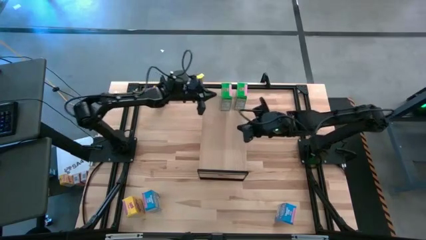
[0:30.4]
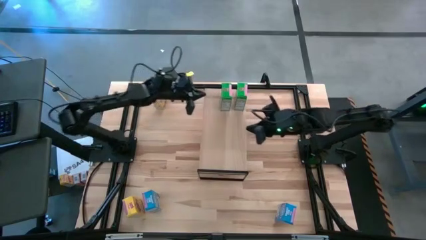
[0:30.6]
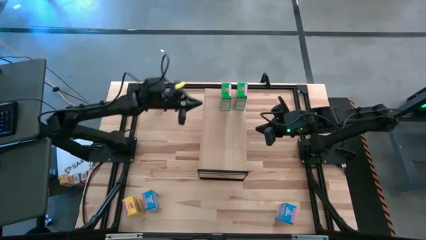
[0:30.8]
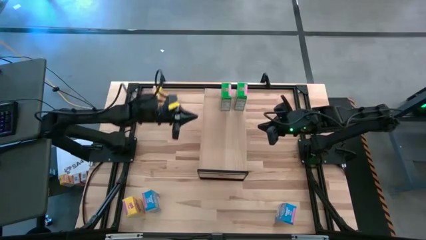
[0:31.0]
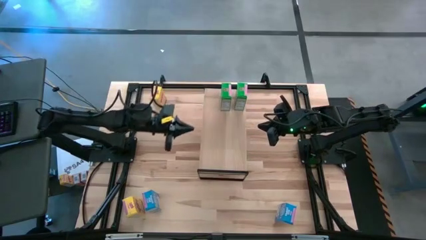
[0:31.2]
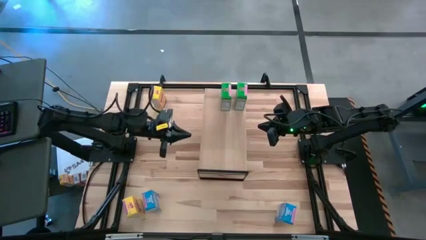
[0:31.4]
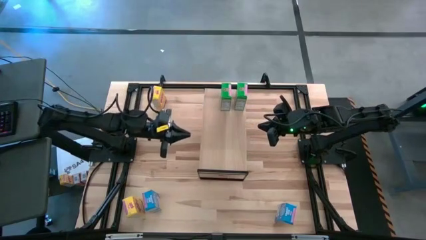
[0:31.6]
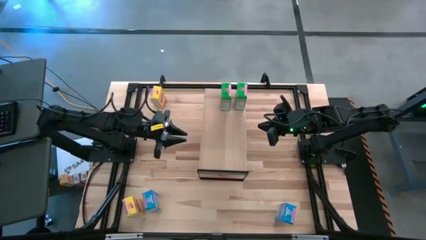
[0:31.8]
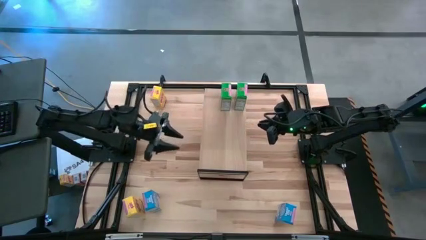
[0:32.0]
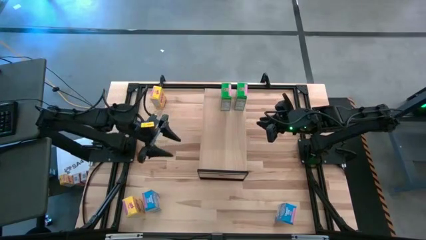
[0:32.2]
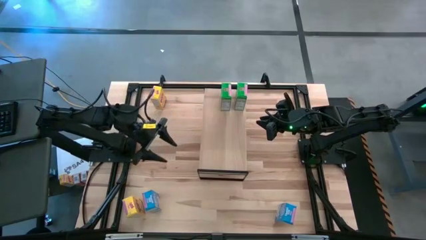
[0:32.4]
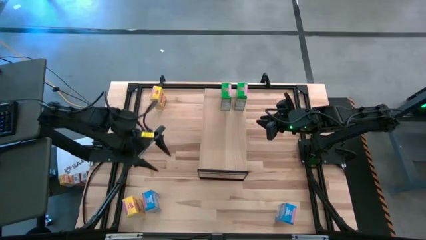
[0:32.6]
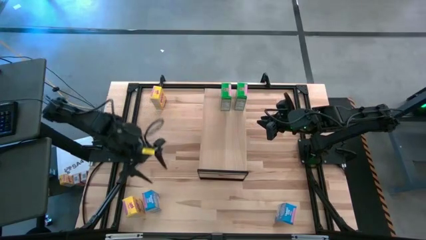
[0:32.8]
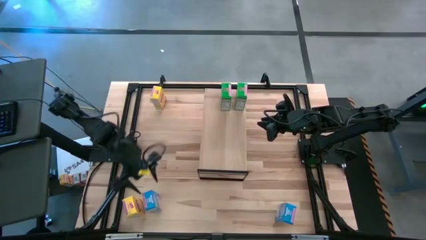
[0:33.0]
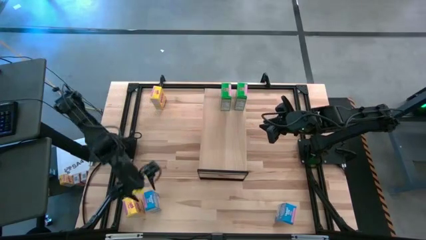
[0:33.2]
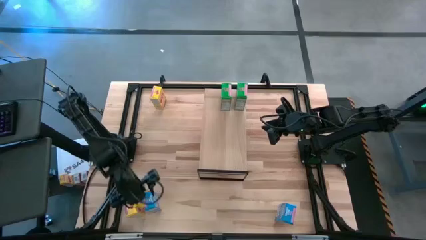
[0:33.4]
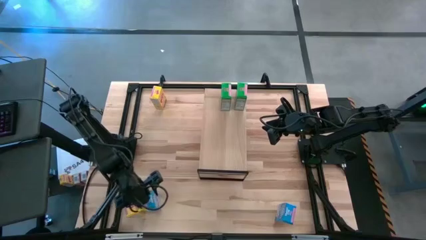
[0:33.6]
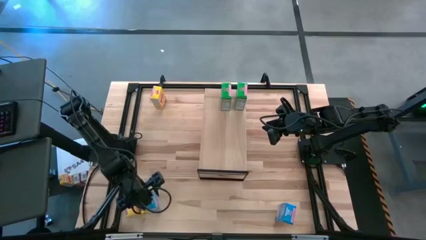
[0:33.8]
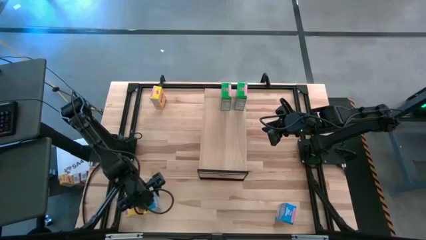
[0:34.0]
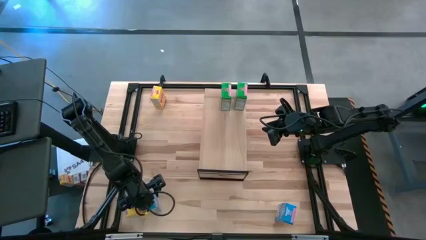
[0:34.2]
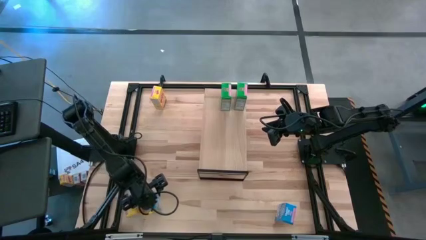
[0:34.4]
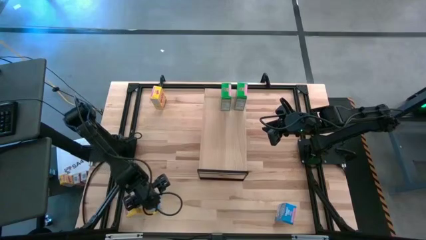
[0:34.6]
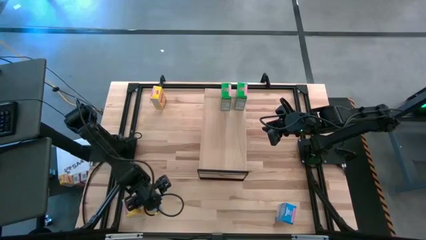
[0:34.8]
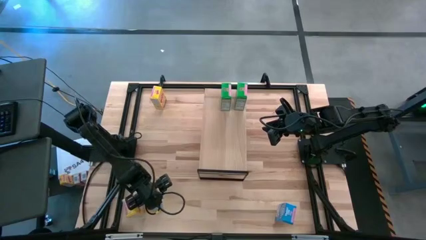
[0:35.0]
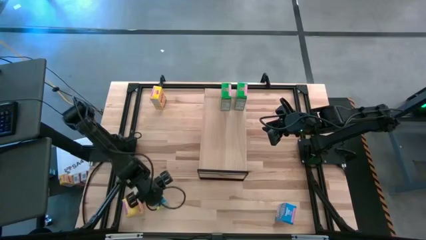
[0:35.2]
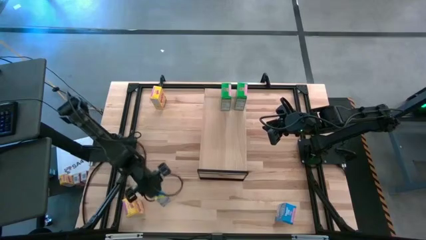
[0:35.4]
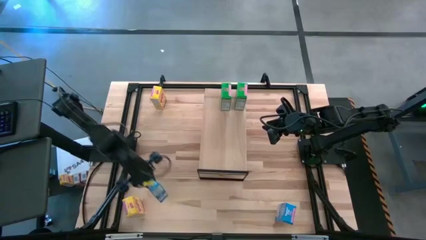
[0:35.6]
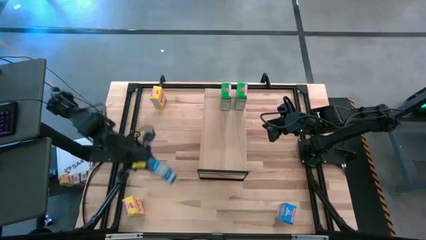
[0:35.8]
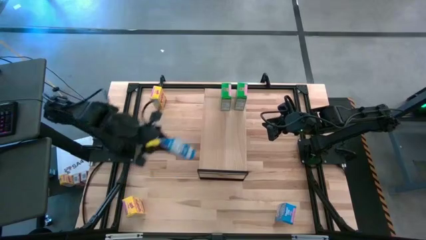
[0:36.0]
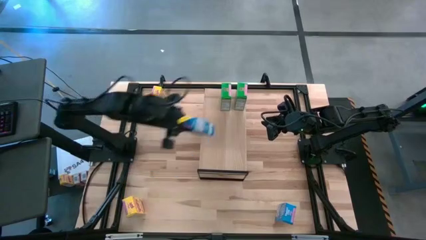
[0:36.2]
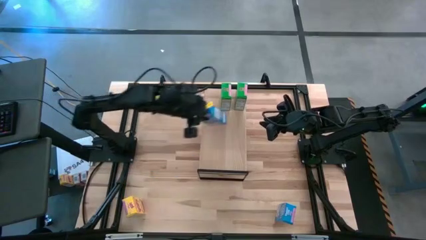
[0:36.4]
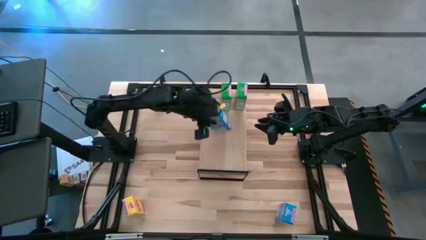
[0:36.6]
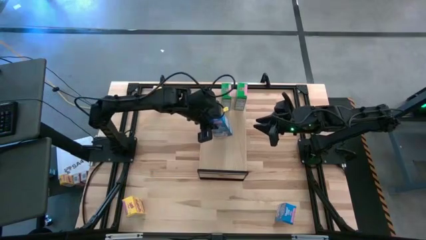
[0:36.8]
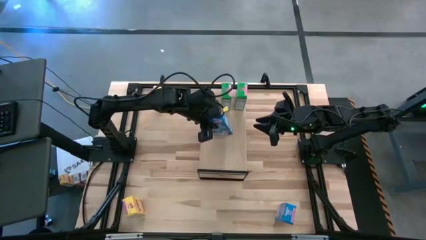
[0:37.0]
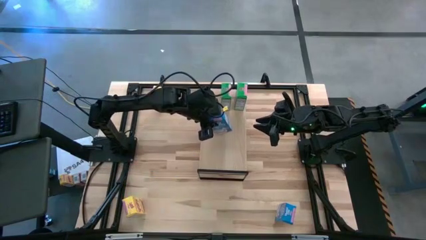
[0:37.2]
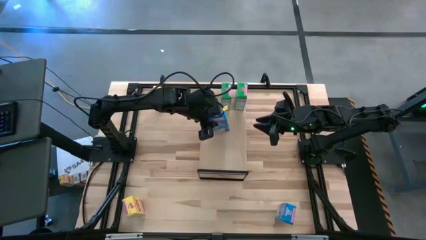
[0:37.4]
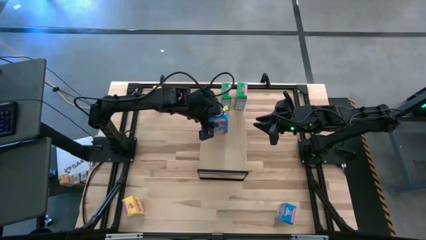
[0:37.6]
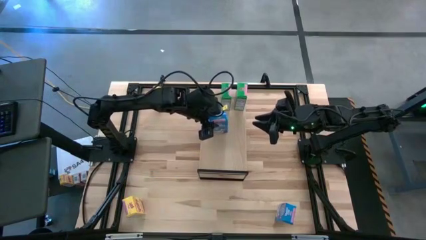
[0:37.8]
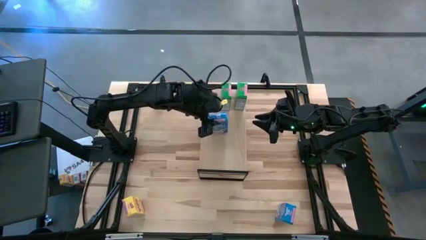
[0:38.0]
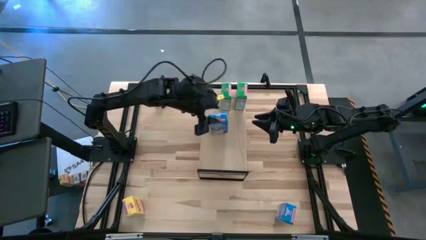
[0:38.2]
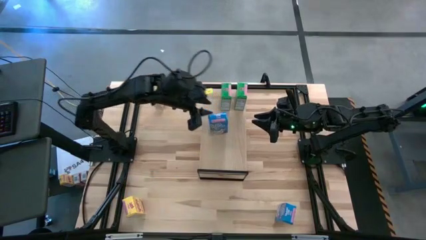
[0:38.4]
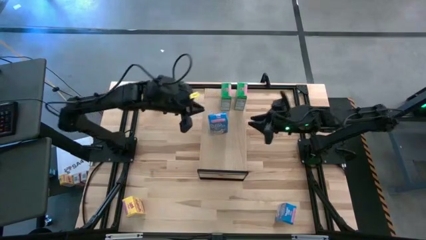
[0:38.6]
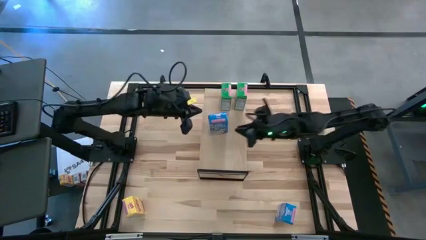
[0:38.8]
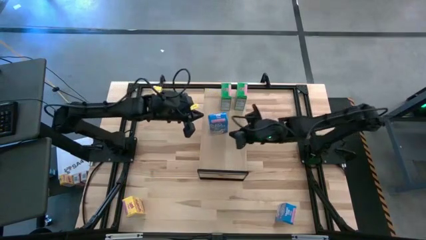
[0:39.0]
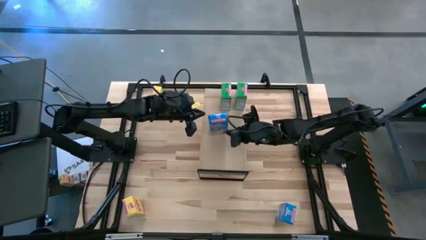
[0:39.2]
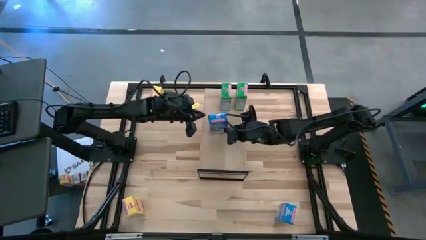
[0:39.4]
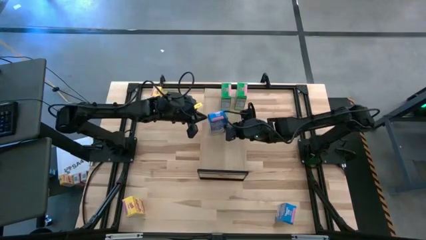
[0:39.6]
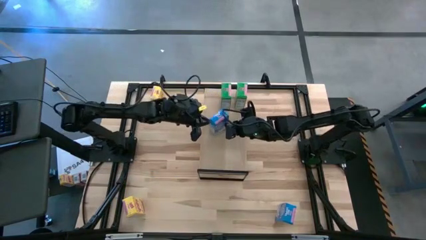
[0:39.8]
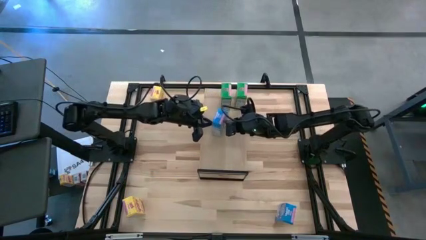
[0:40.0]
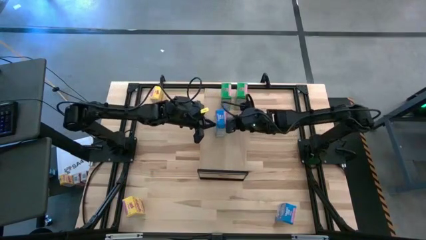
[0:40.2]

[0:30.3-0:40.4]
Task: Stack cereal on shelf
Put the left blue cereal box on the shelf
